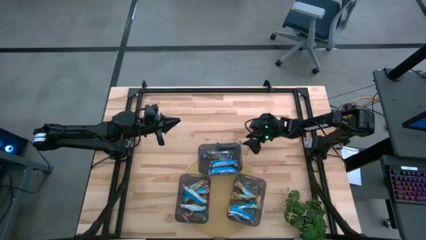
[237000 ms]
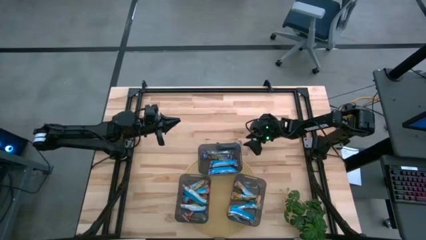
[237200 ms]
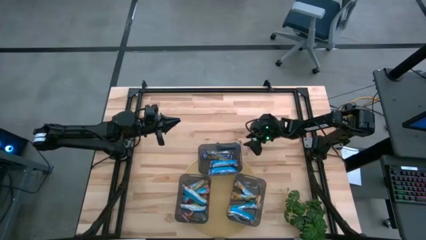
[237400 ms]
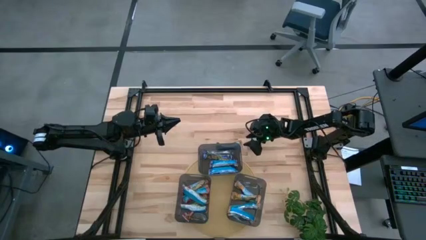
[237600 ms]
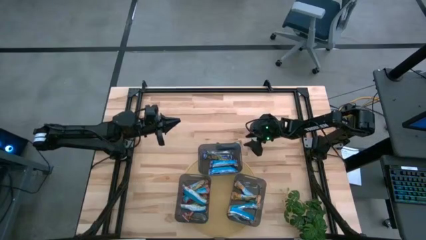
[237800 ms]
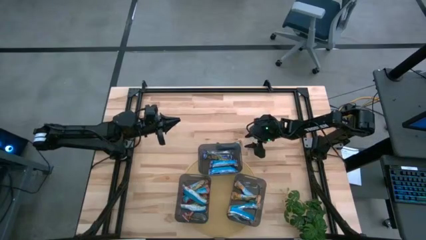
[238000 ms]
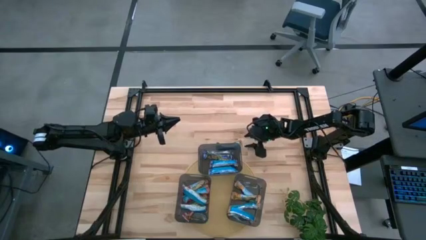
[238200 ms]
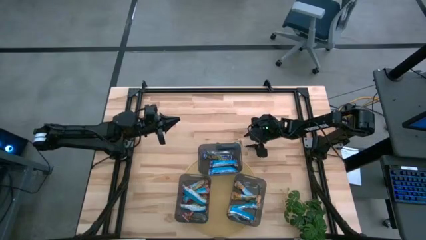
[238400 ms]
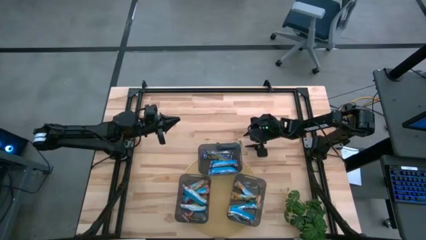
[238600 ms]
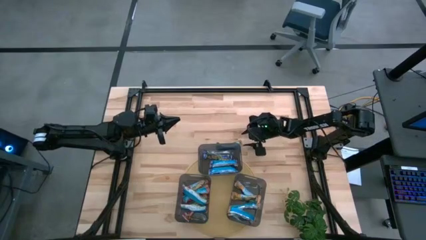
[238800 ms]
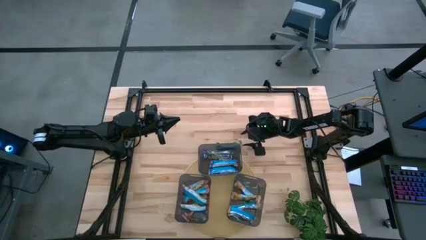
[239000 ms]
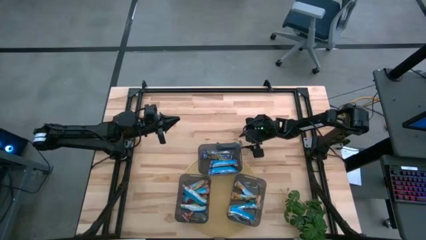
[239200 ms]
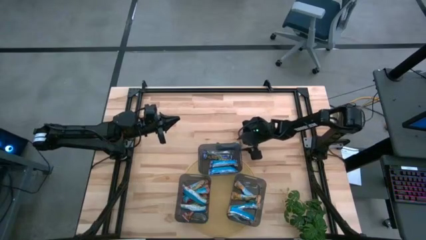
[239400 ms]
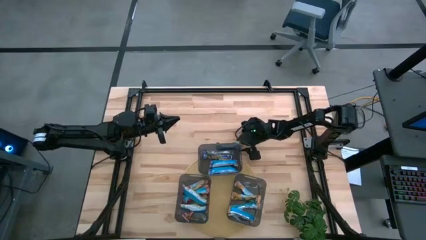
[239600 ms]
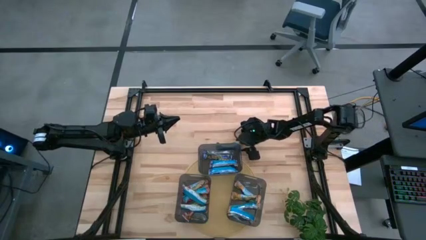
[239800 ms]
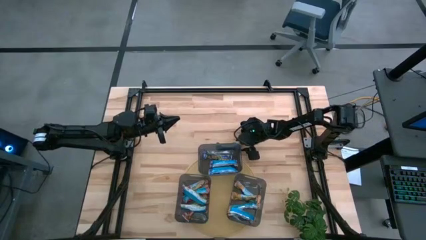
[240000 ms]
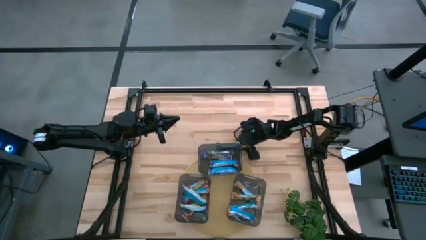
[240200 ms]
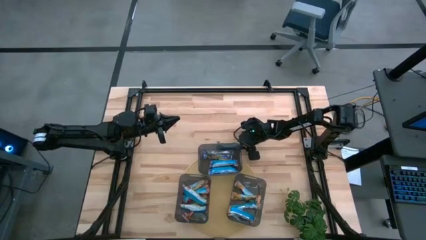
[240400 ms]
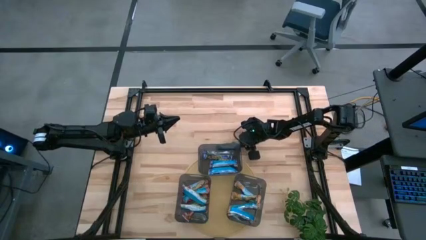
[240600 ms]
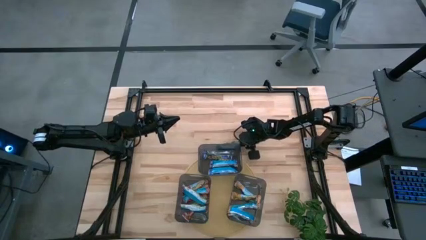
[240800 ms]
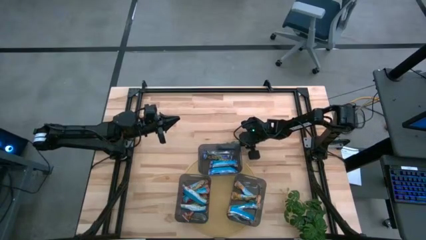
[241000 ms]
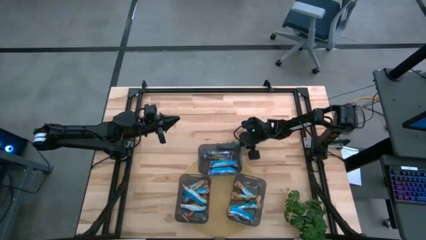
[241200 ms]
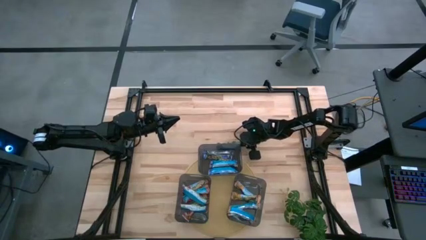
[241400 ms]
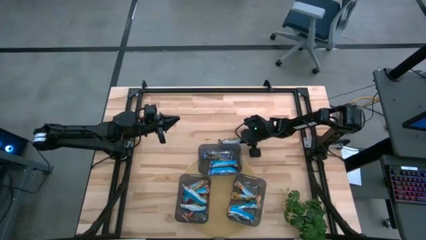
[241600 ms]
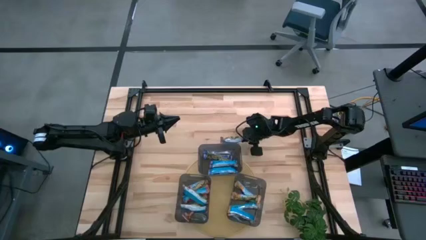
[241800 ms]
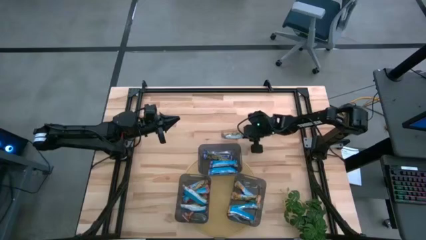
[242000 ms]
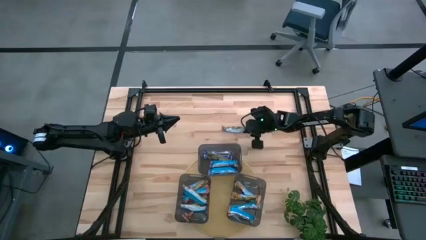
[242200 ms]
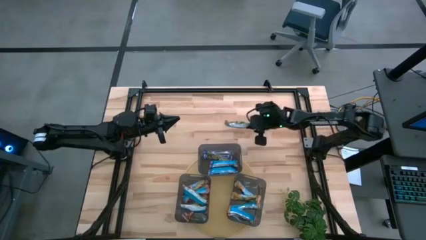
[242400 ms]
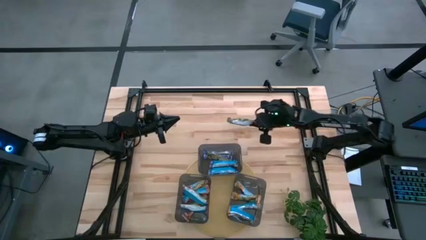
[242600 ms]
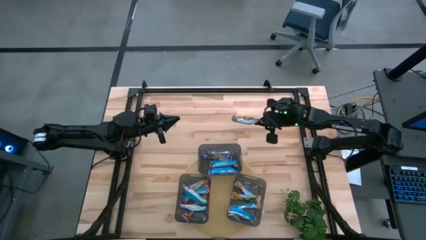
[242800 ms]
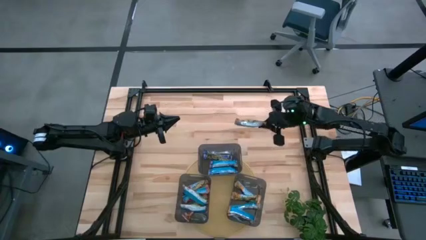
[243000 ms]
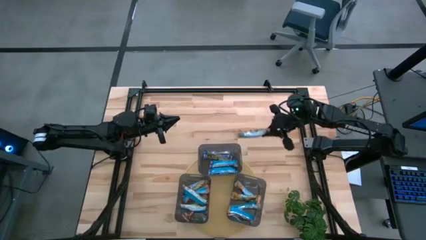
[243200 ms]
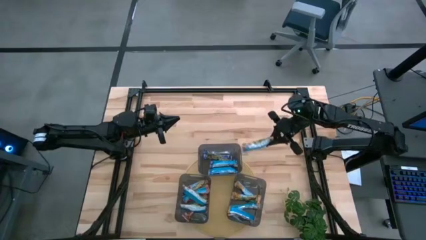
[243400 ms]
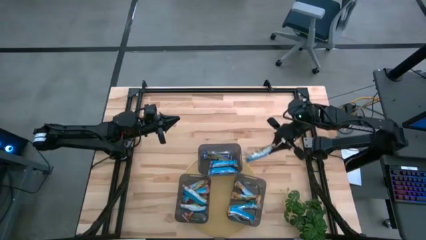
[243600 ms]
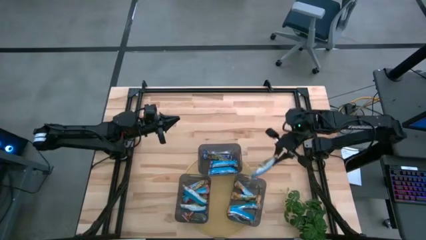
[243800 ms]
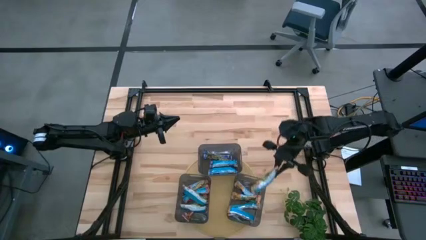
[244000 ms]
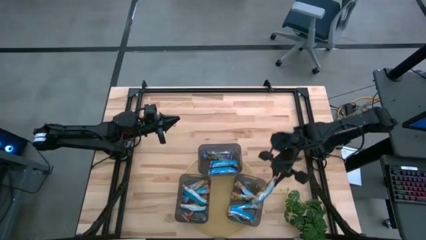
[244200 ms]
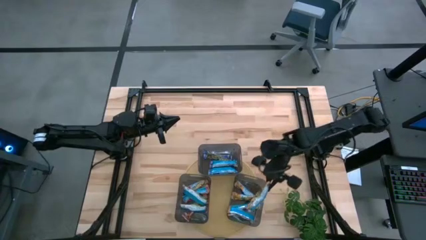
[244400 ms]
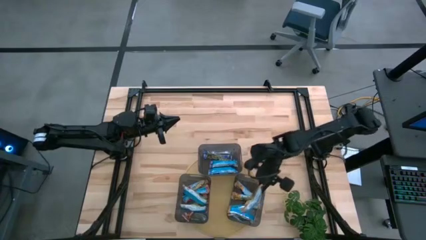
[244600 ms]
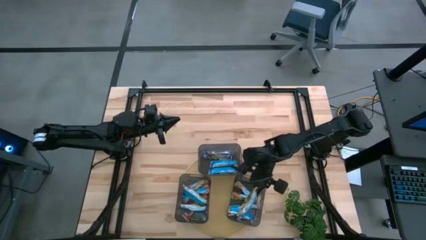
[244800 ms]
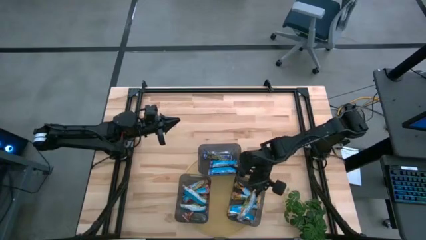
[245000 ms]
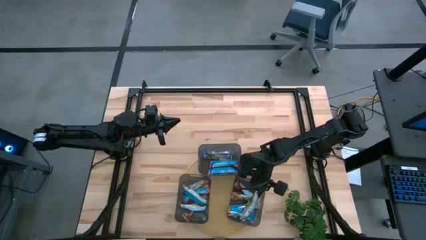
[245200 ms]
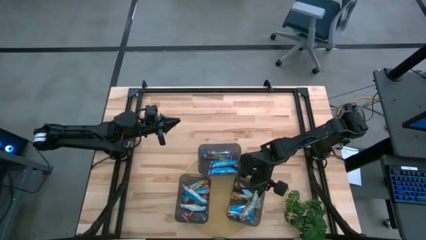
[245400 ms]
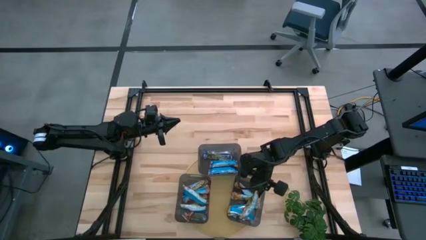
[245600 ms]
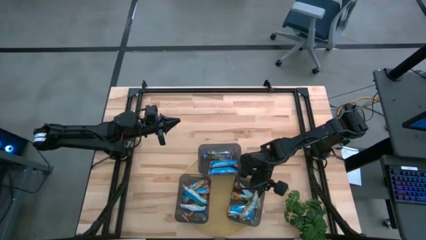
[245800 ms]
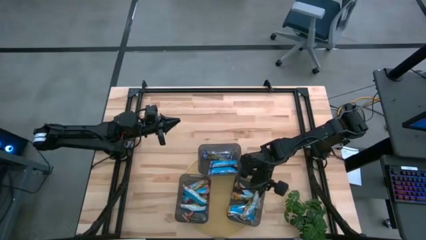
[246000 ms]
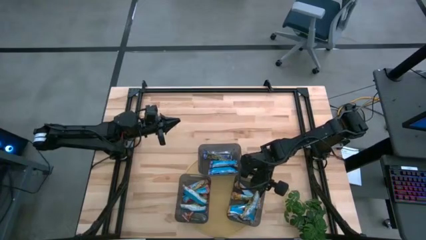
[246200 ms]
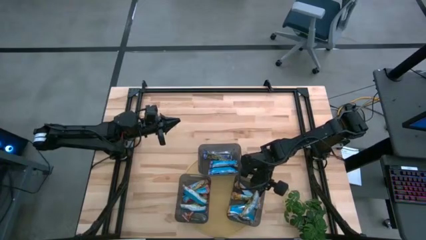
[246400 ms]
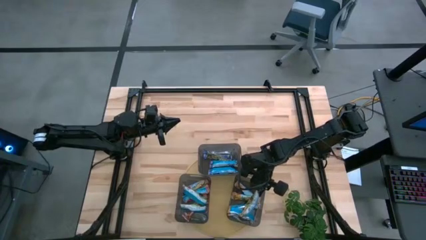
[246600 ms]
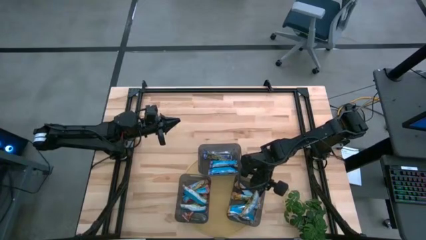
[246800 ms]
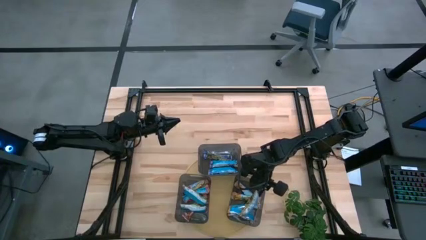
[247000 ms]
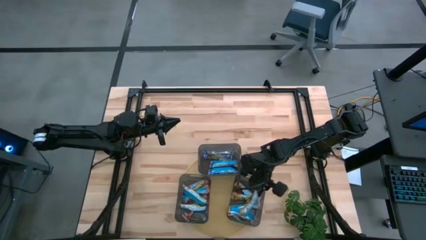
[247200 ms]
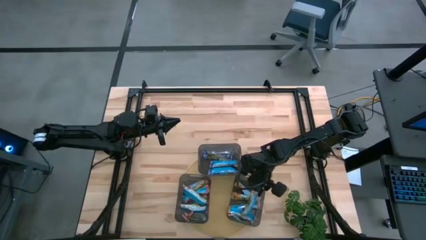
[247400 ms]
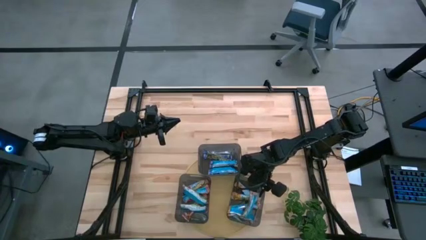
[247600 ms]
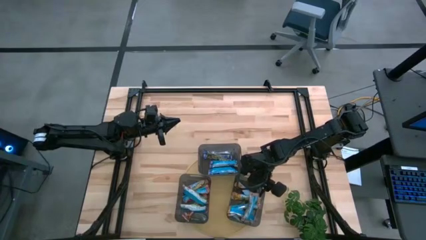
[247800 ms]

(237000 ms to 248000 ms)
Task: Pick and place Granola Bars by type
Put the yellow granola bar into the bottom right black bin

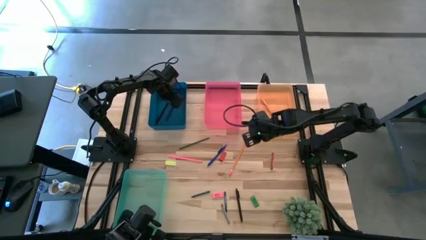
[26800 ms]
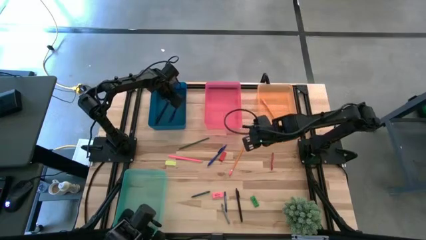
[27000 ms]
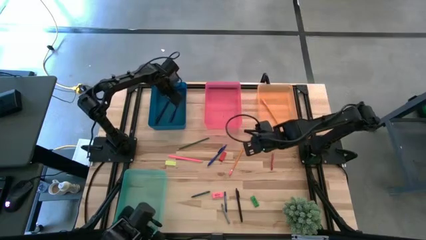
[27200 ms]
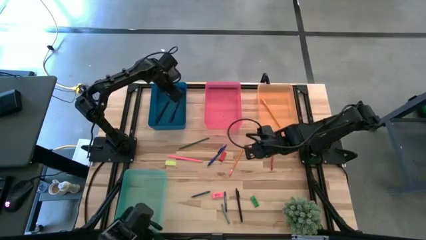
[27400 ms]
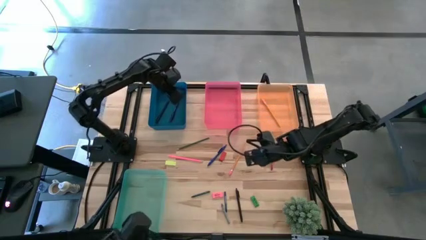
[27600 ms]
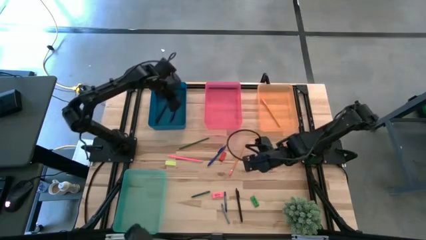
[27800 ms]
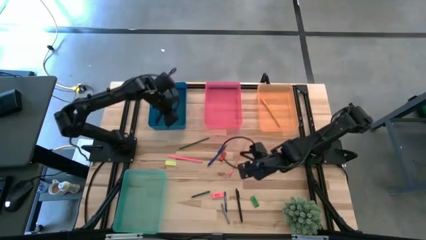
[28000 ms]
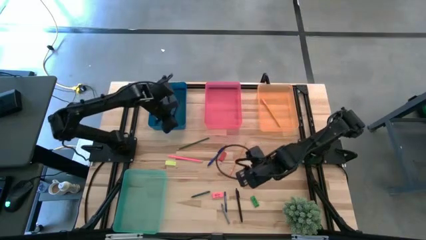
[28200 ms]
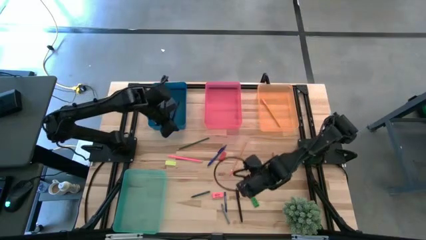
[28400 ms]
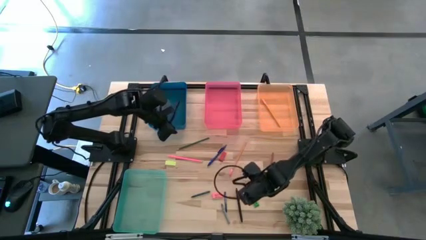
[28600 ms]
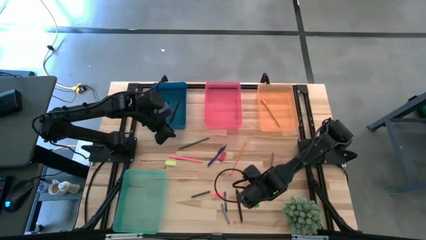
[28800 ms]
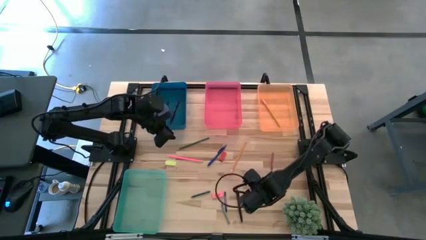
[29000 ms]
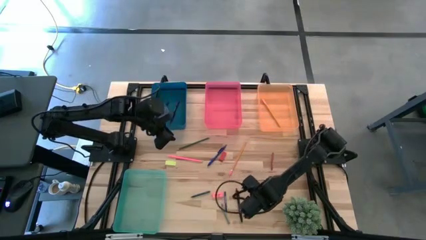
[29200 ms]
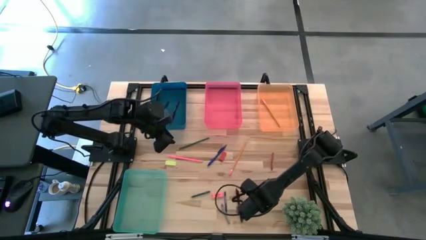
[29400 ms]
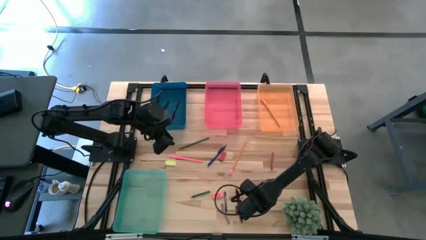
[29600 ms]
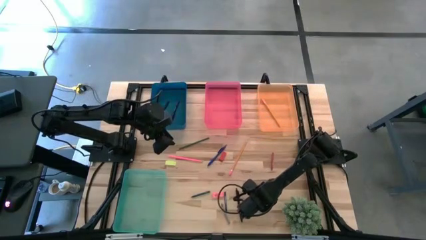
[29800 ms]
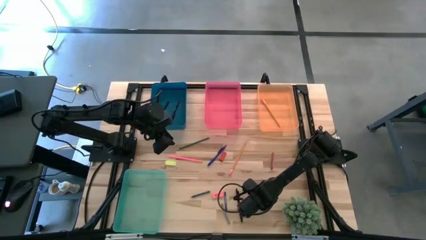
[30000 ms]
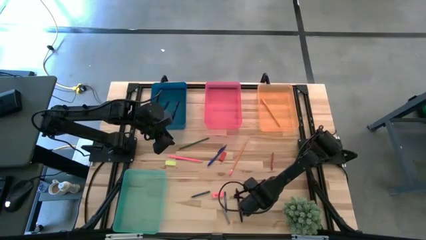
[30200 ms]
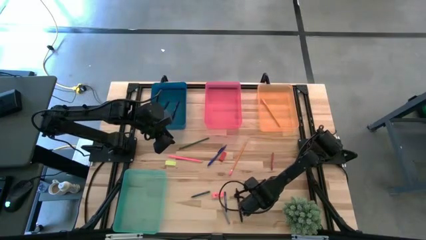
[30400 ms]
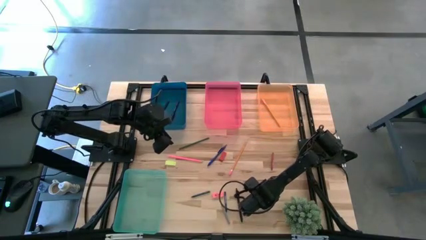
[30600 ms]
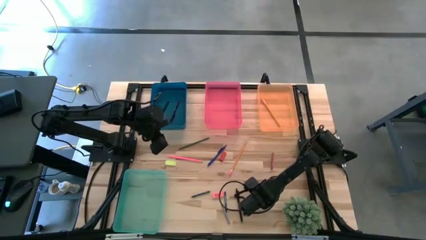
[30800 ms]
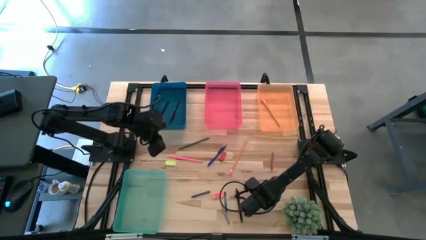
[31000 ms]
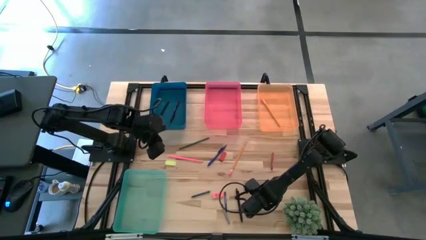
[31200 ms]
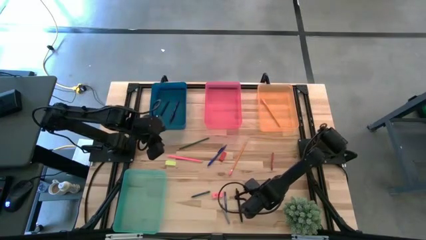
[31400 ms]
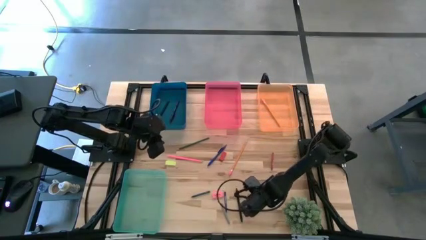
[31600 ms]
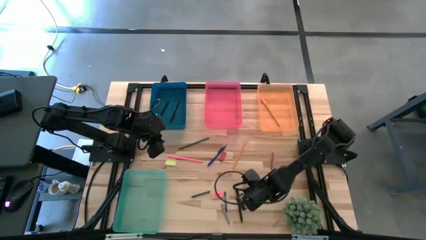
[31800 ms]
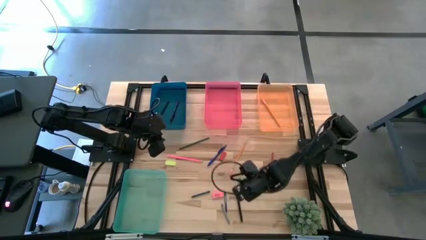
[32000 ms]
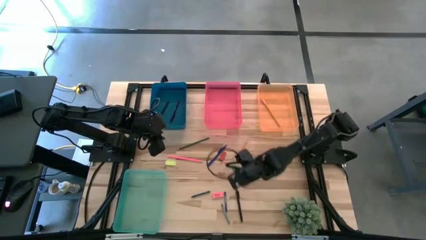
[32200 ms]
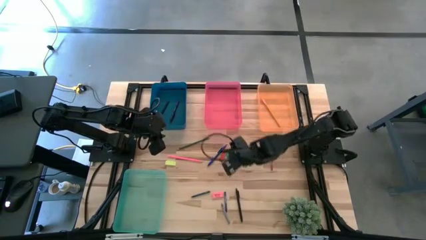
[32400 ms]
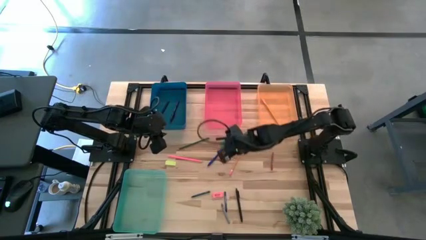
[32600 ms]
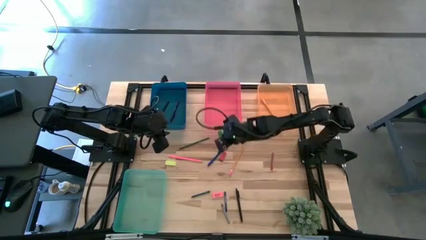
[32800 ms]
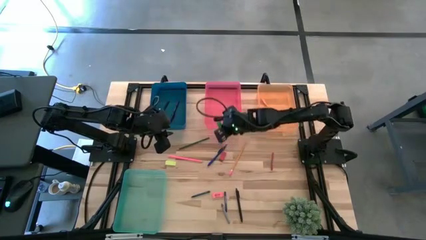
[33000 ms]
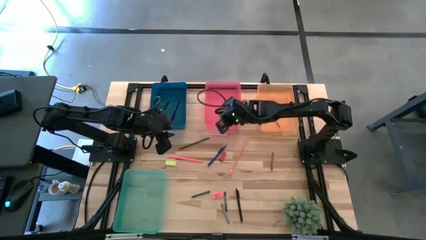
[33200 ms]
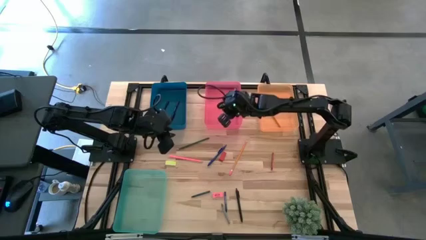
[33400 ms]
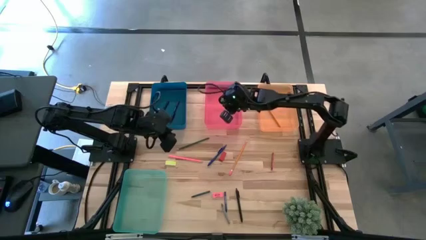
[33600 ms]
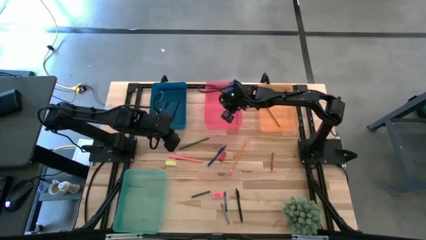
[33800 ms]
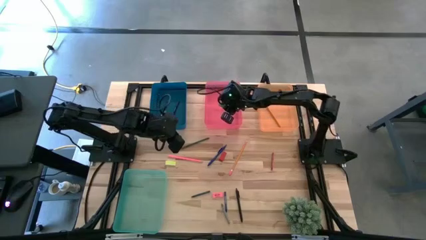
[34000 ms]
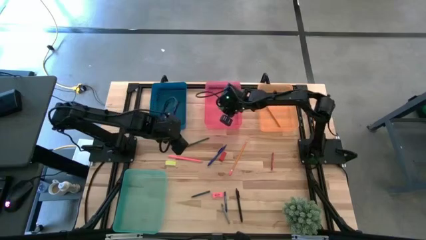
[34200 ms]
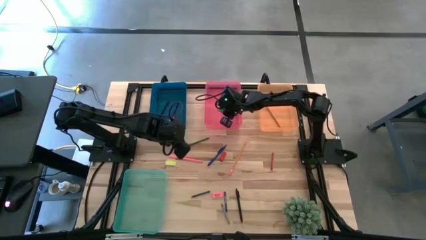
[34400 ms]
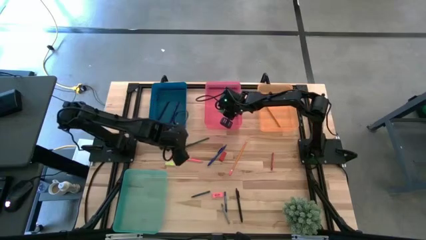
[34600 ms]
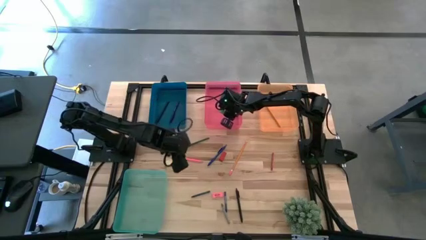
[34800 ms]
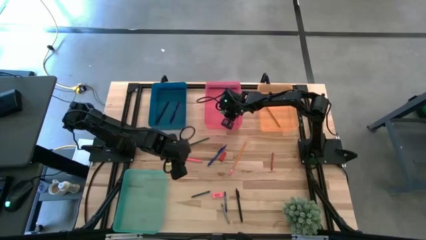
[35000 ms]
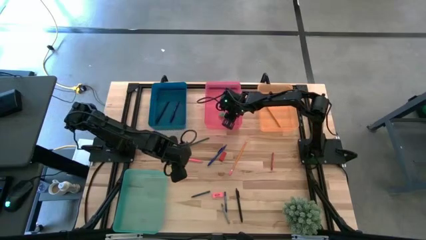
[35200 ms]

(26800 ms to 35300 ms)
Task: Sort crayons/erasers/pens/pencils in bins
Put the green eraser into the pink bin
